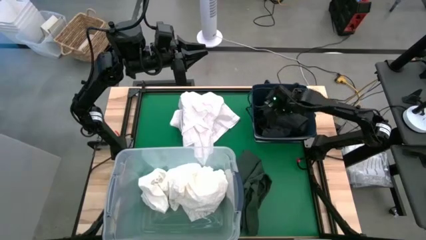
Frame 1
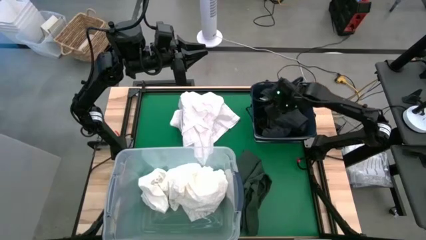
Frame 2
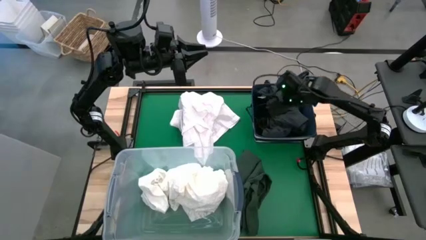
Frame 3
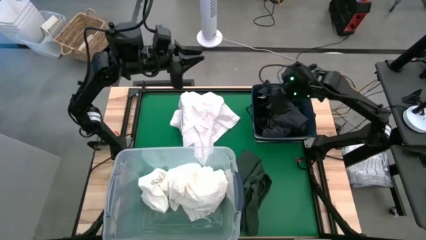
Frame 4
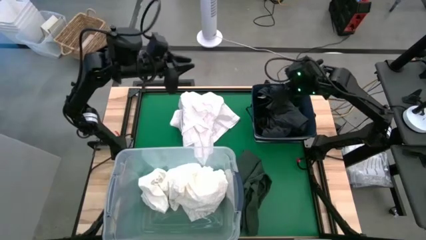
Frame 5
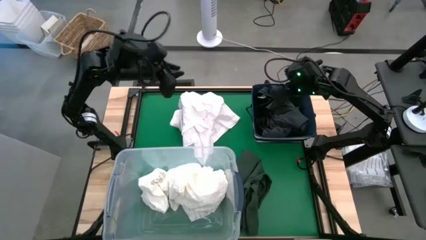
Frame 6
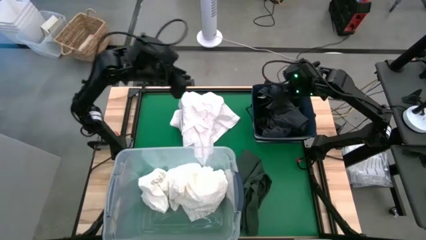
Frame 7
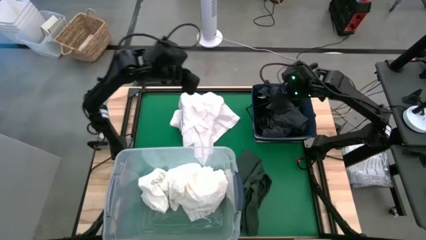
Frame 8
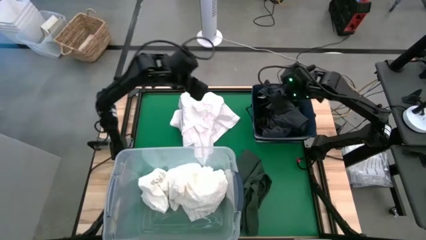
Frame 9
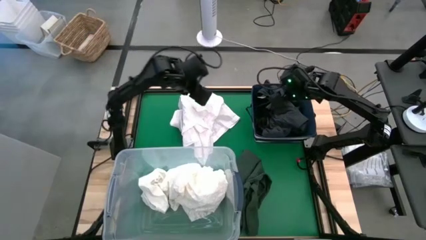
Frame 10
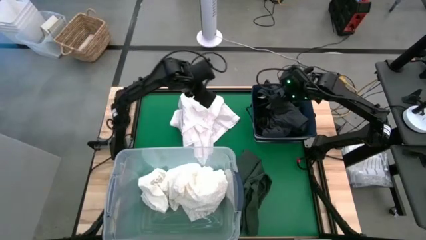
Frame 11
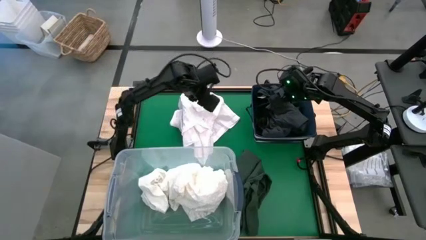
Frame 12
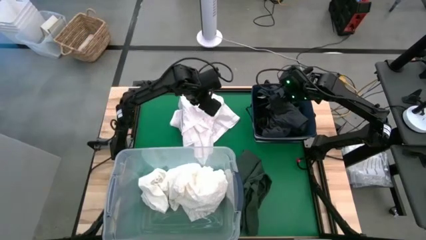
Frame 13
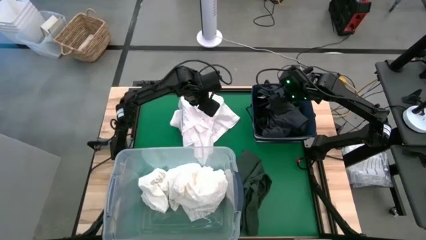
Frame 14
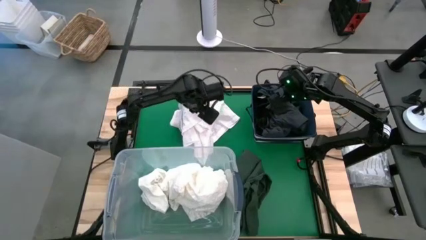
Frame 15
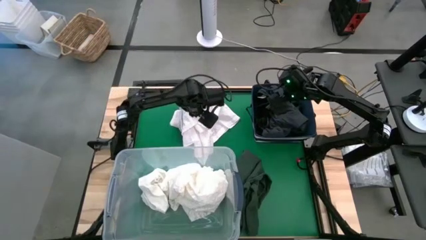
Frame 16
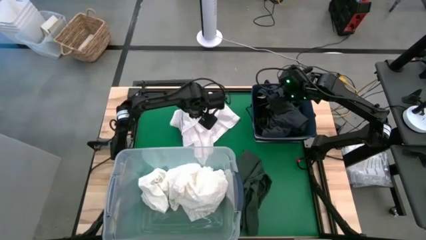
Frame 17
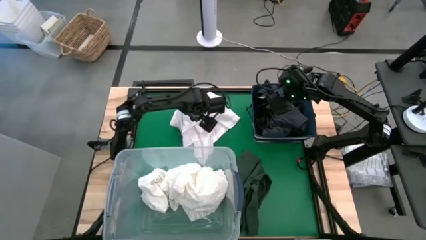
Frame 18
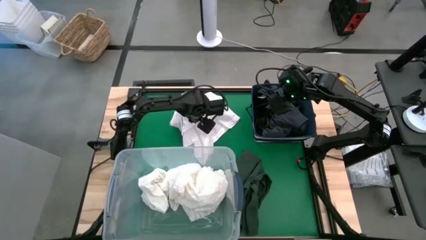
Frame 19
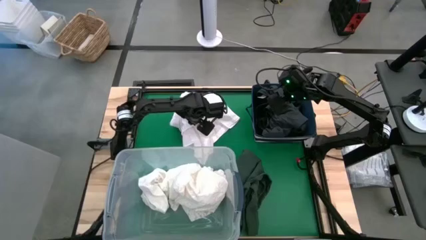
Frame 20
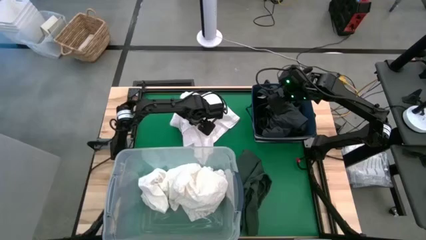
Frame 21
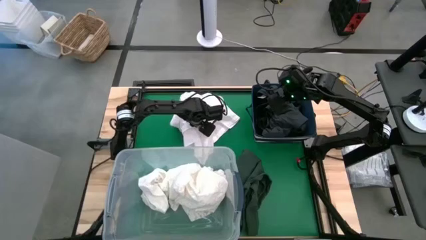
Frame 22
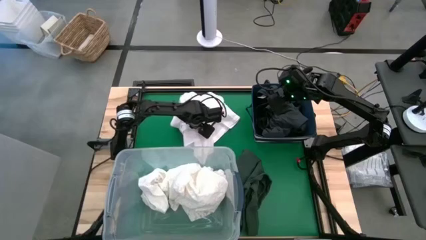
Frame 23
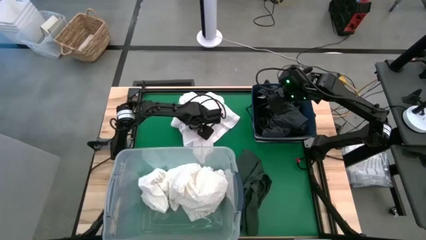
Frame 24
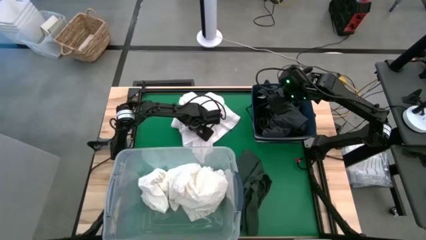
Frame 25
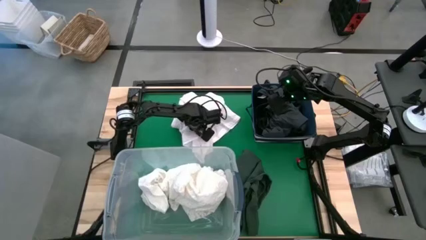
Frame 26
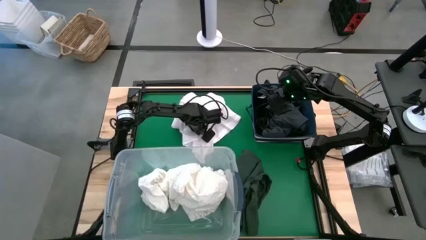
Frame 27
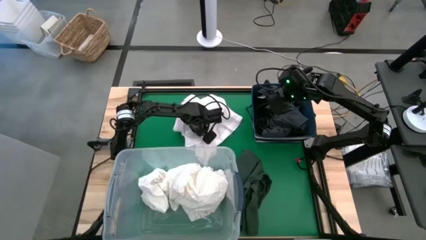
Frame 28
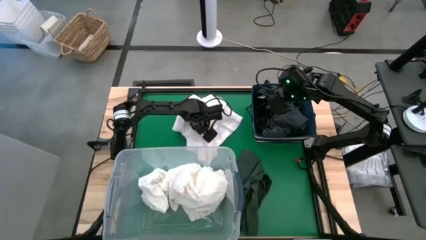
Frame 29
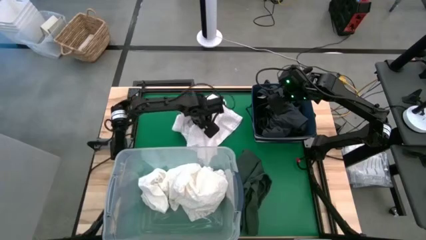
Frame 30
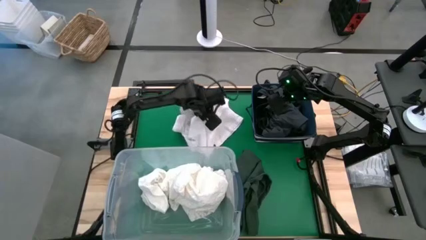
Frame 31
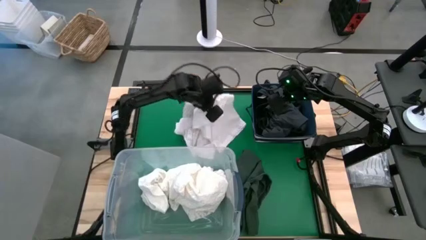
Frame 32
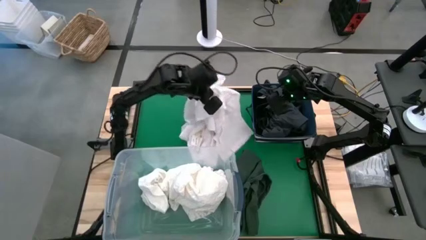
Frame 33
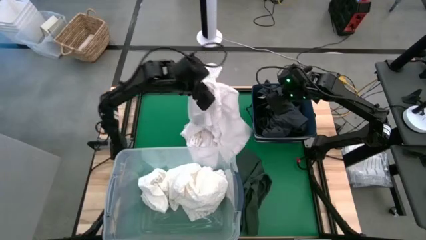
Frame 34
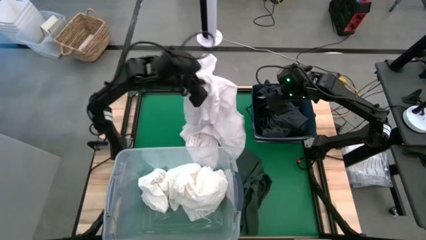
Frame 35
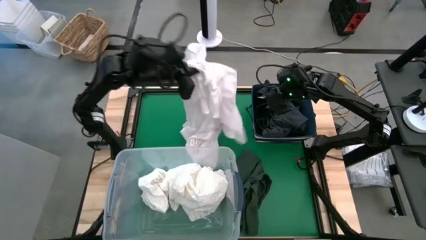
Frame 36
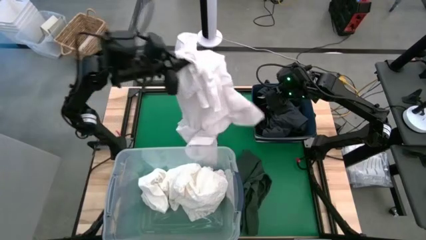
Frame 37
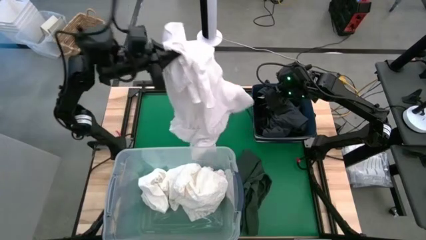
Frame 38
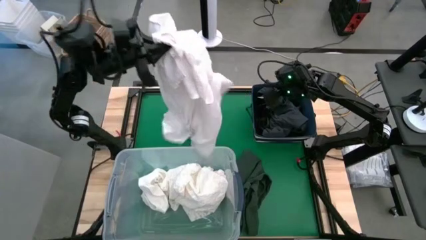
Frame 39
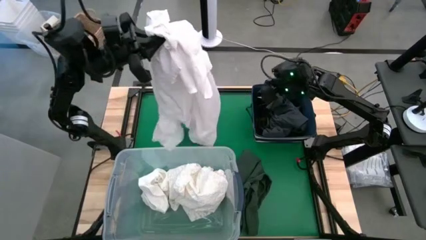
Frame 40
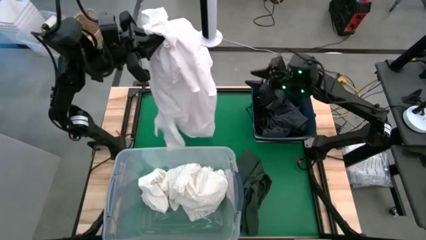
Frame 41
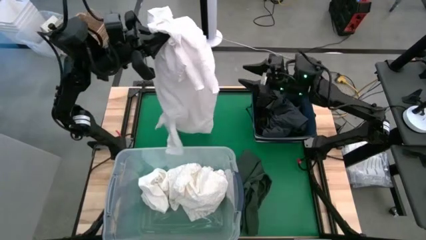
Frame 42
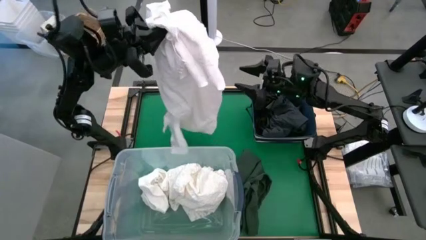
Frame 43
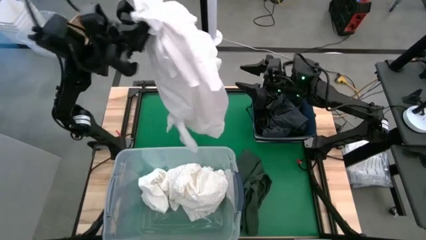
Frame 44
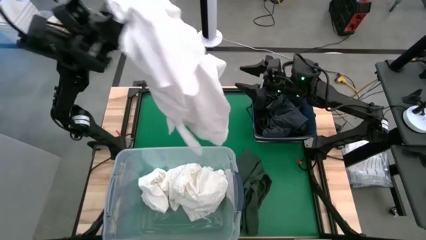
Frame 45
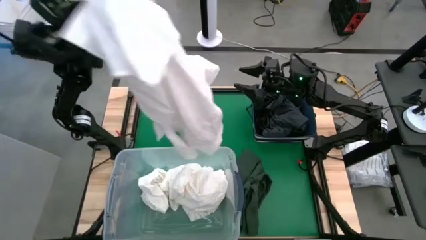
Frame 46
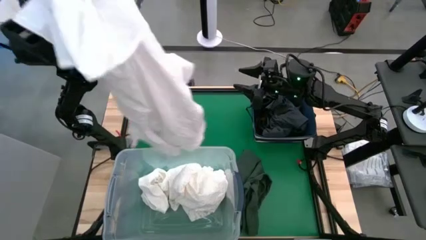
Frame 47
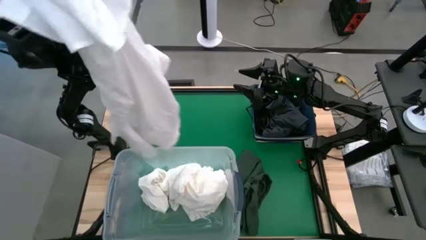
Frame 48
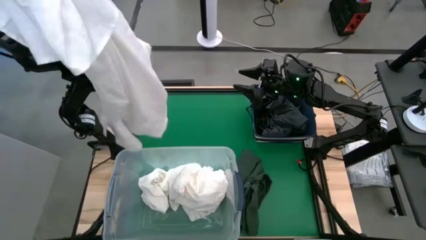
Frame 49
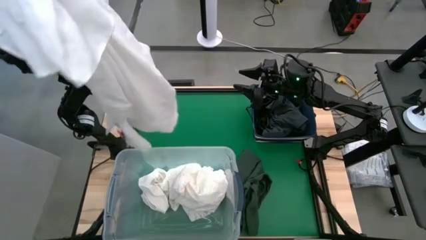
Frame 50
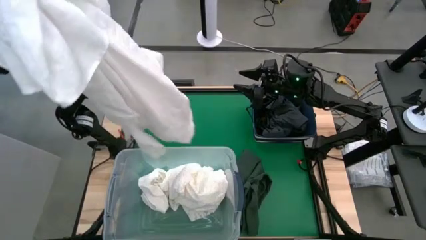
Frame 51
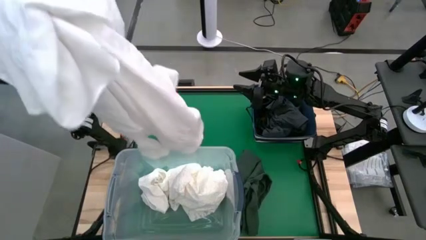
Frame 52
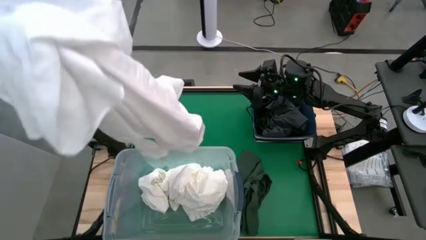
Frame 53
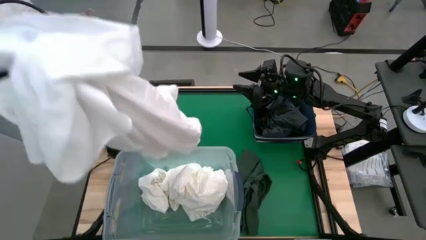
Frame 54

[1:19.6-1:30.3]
Put the white polo shirt into the transparent bin
